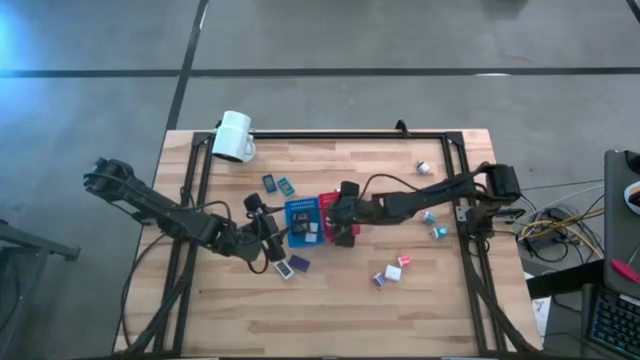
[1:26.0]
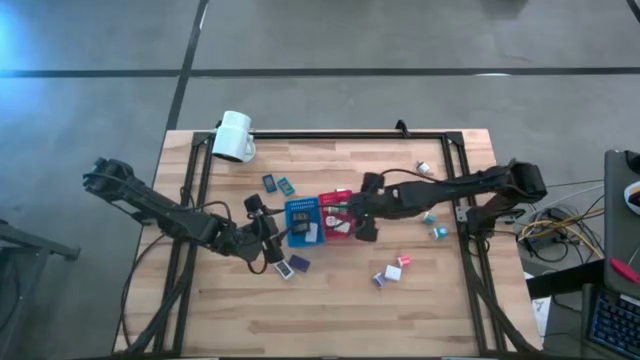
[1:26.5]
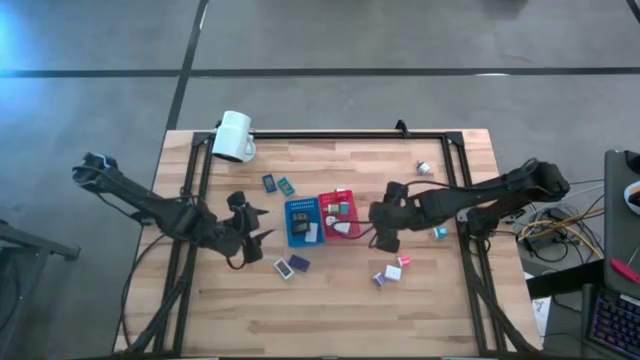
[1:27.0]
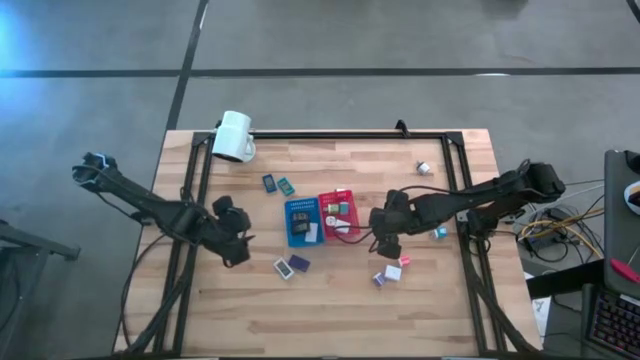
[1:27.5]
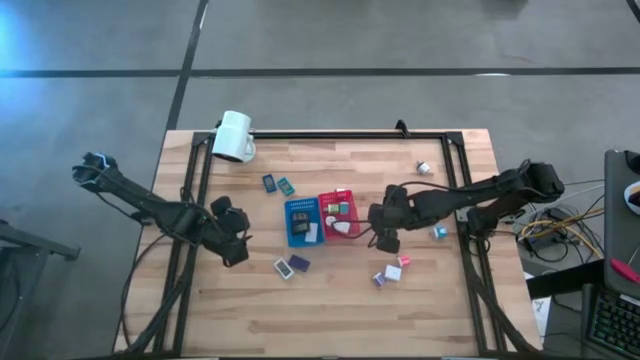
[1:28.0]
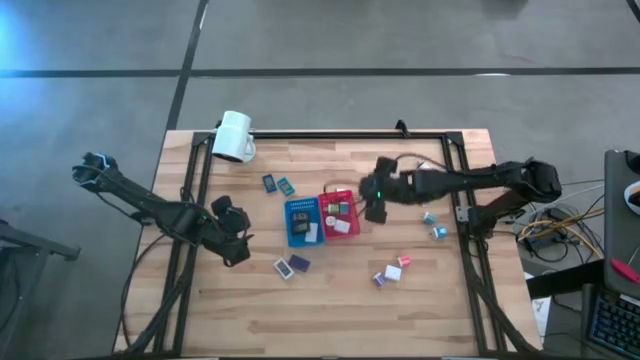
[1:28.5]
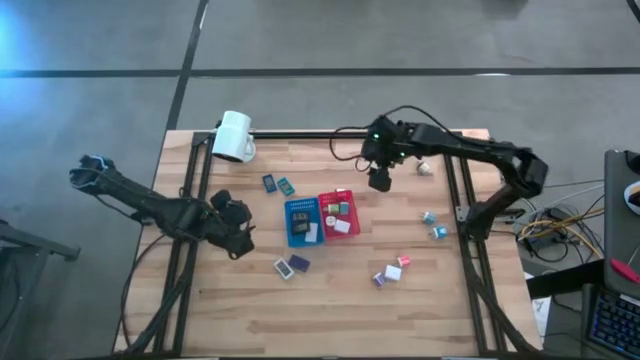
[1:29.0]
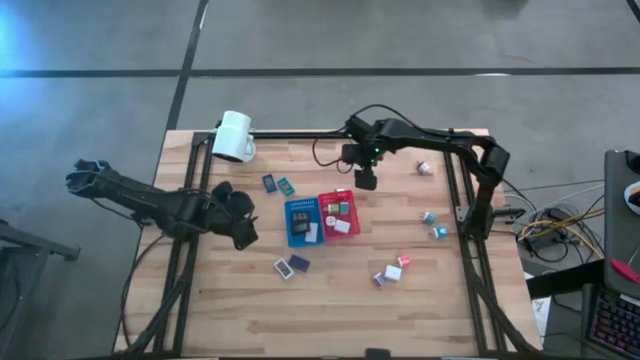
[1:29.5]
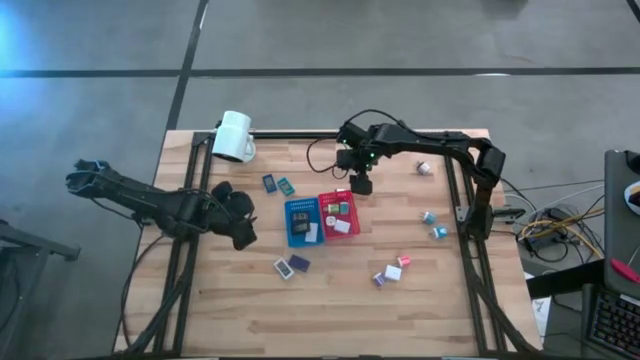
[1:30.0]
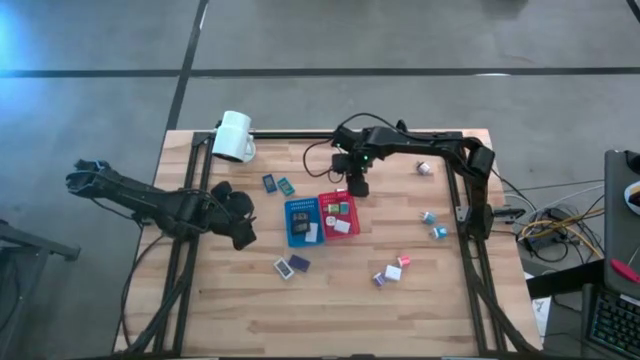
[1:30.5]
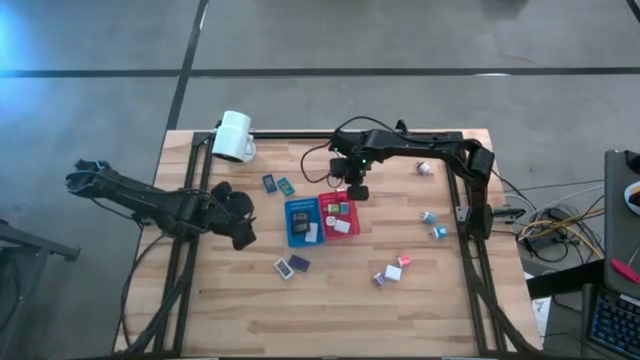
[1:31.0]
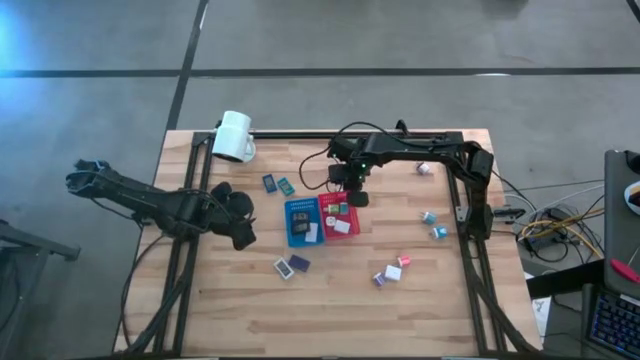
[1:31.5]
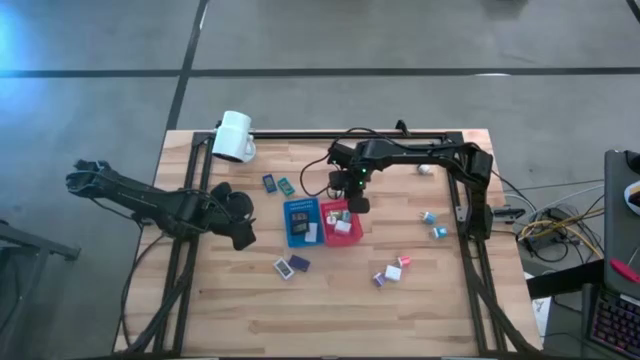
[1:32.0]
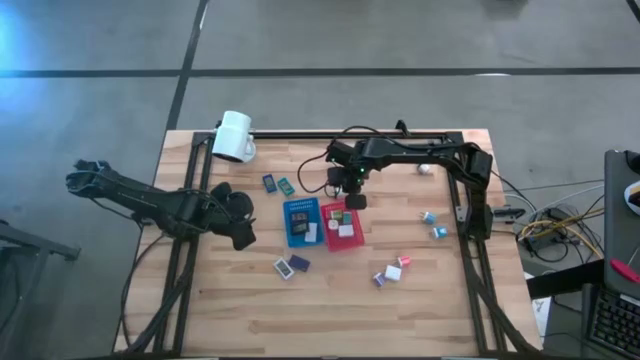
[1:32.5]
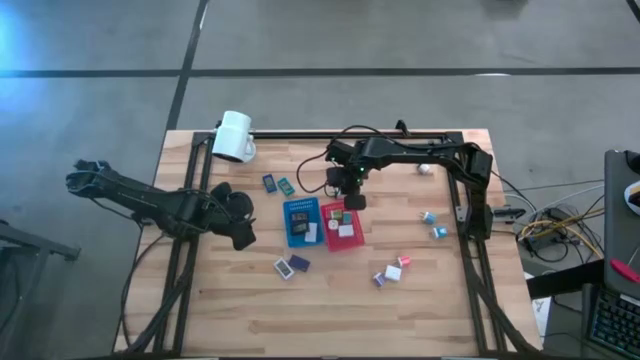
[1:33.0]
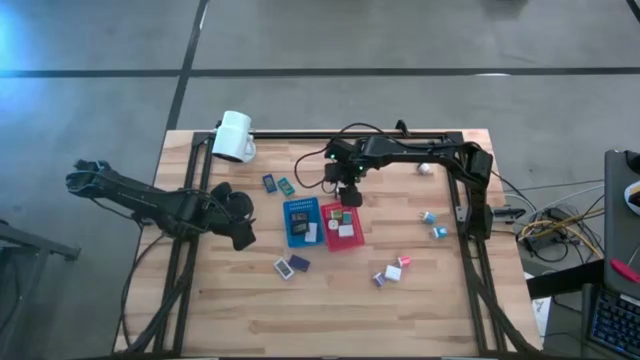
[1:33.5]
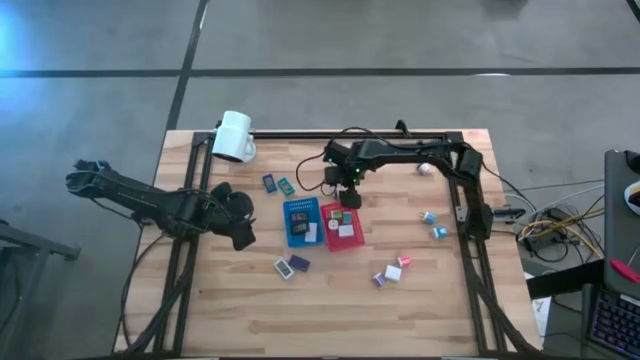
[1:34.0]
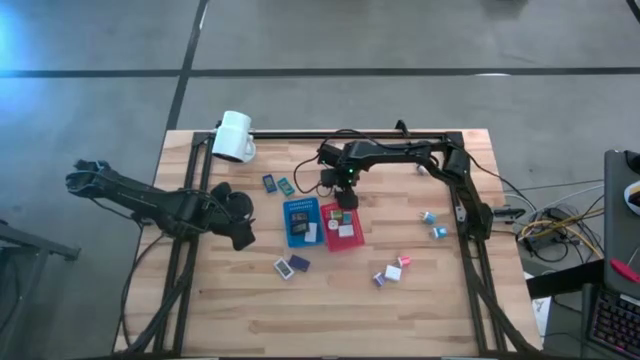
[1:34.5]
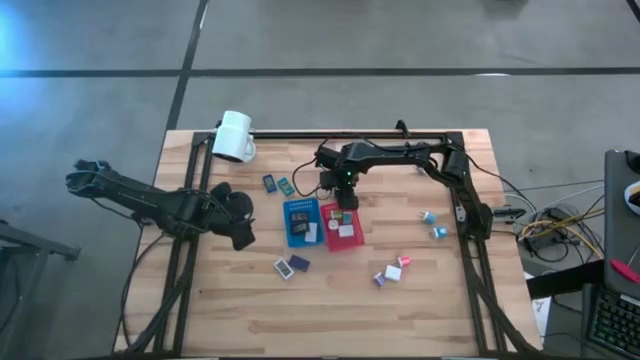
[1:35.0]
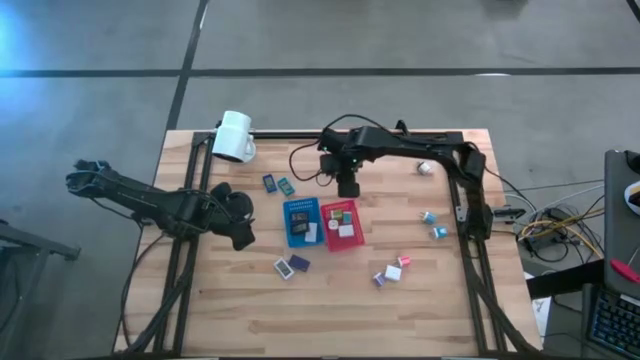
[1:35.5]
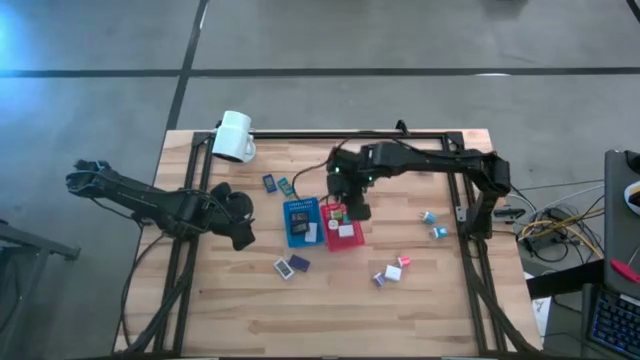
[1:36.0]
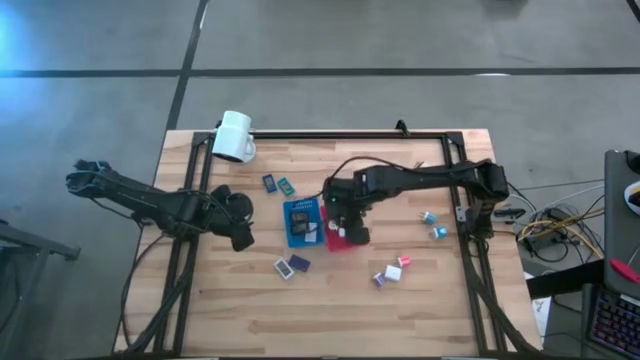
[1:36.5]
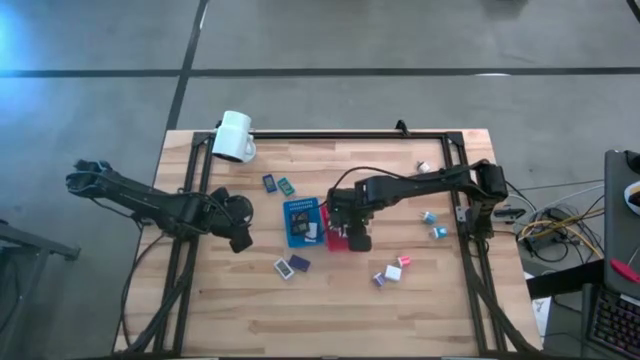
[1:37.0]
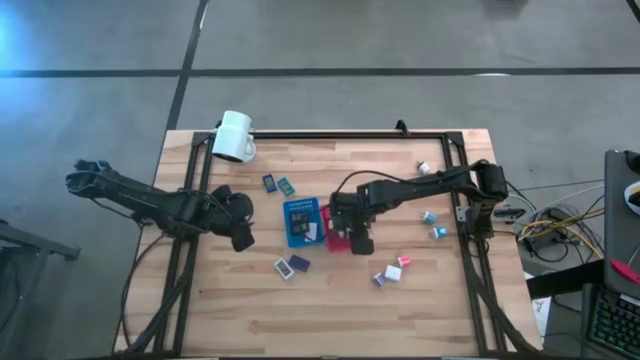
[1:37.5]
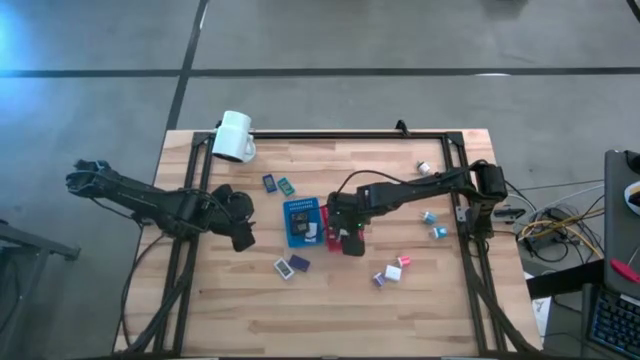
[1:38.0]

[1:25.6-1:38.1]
Task: Pick & Place Office items
Put the left white black charger into the red bin

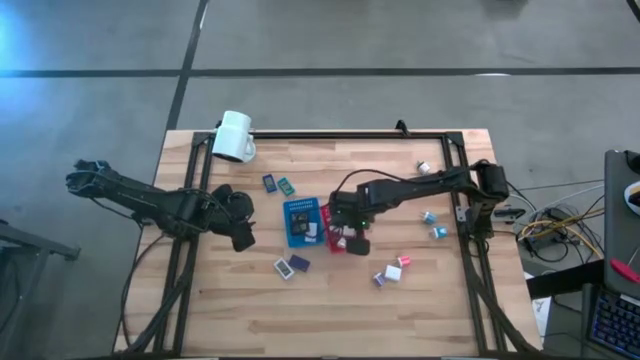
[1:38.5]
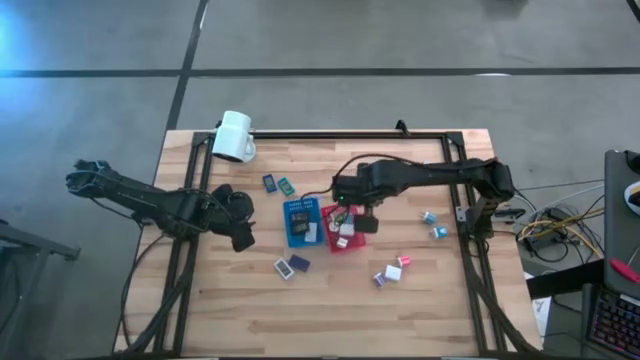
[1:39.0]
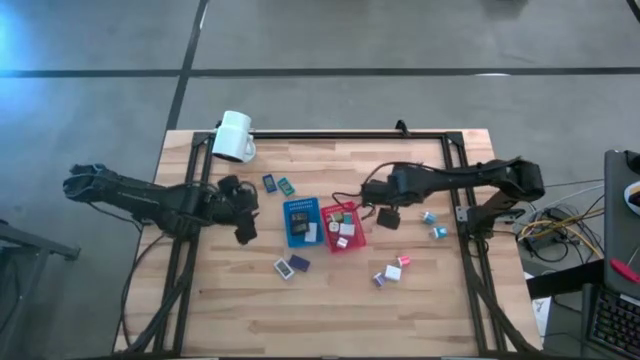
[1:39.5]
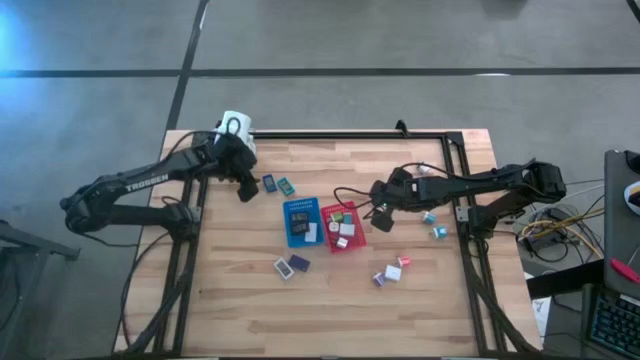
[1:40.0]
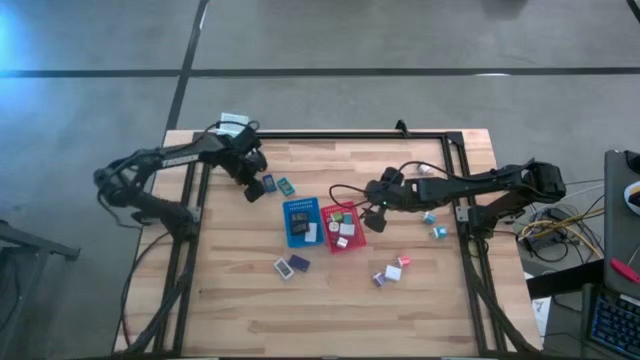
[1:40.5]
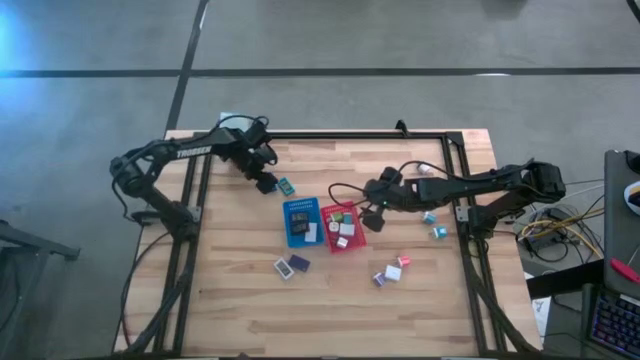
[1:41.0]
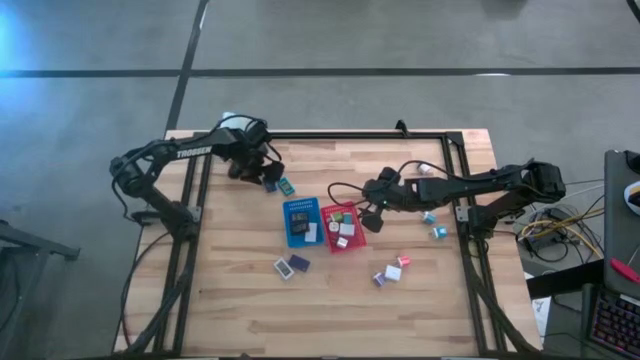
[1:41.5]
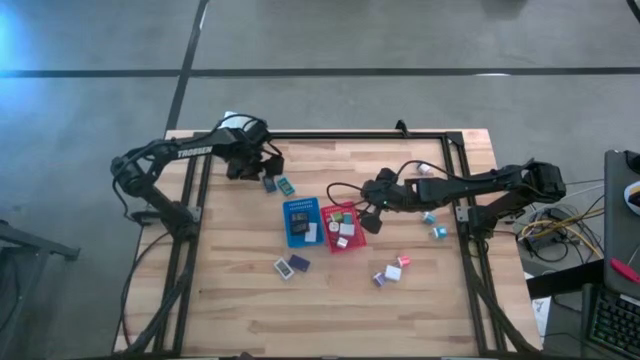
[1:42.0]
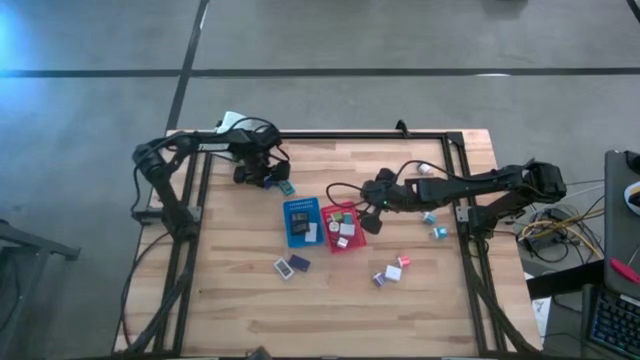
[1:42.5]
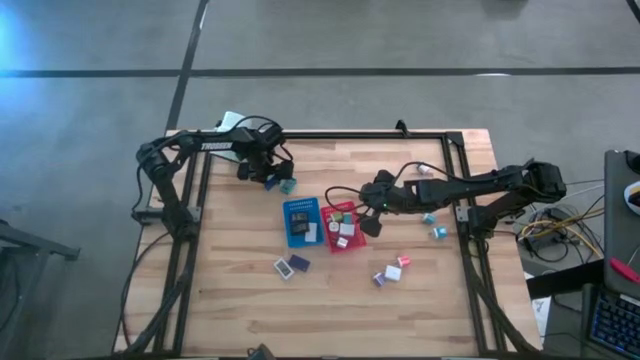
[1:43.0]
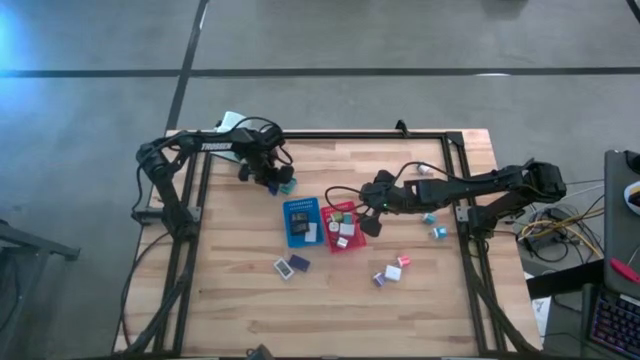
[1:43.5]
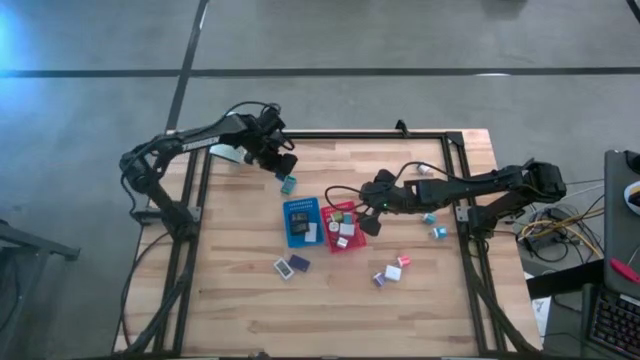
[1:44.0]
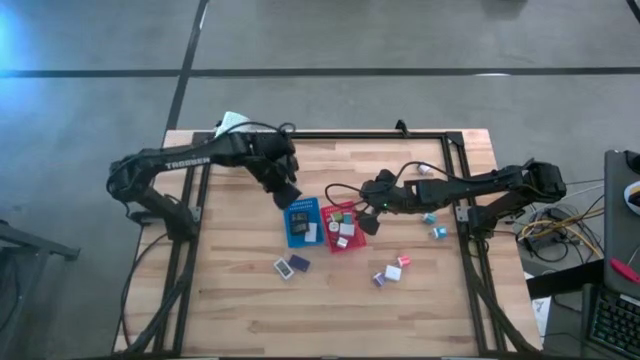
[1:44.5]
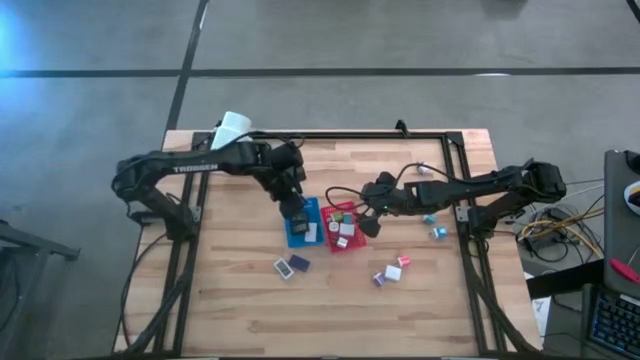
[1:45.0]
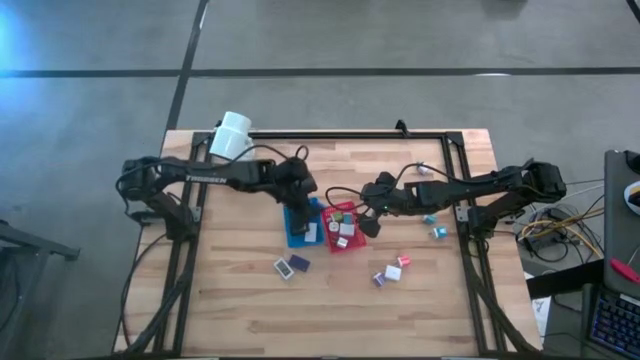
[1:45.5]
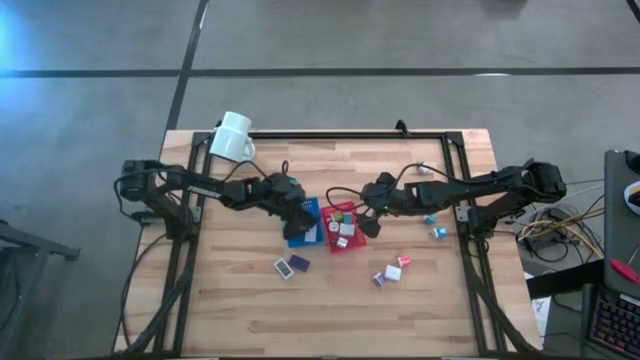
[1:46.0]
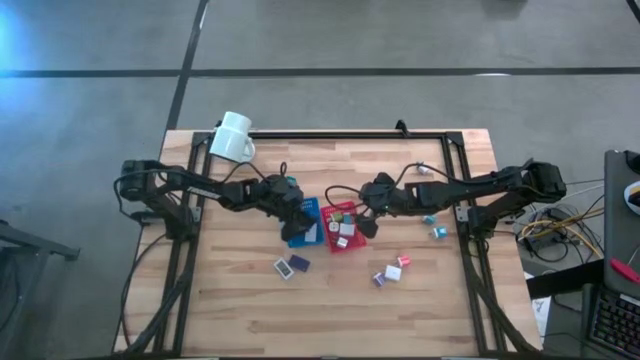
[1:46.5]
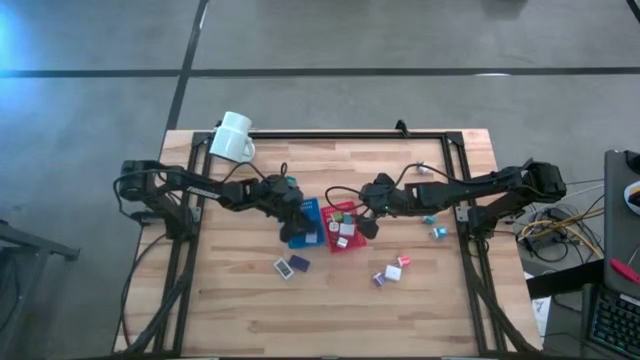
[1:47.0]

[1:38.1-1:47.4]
Put the dark blue digital clock into the blue bin
